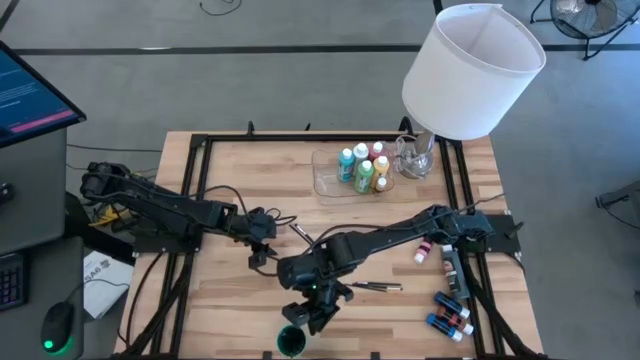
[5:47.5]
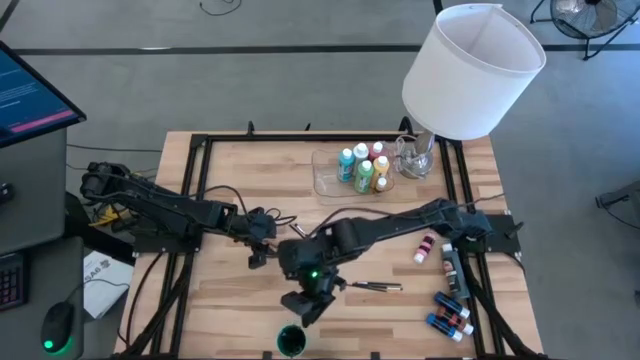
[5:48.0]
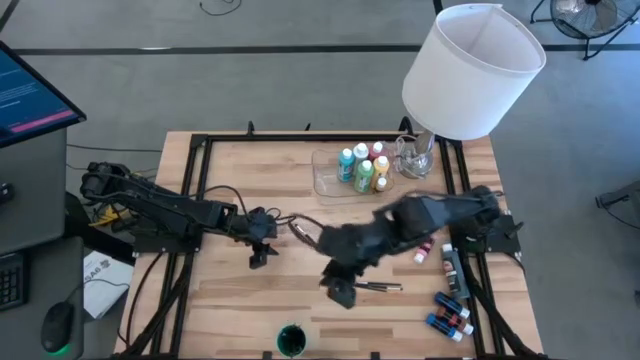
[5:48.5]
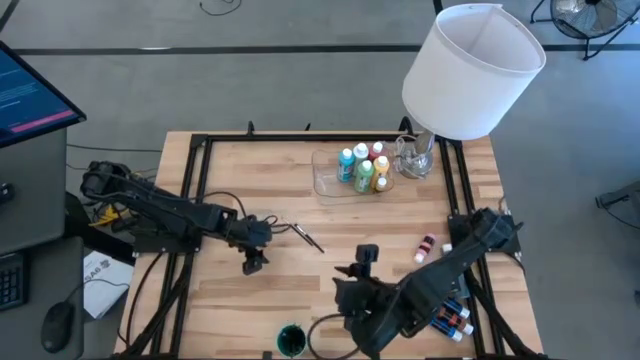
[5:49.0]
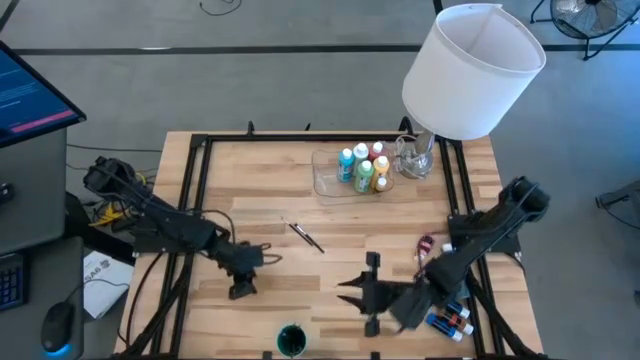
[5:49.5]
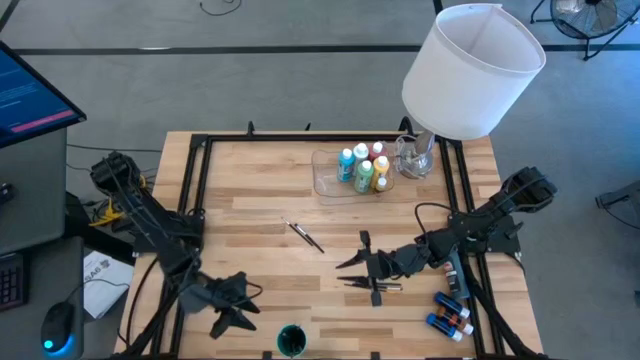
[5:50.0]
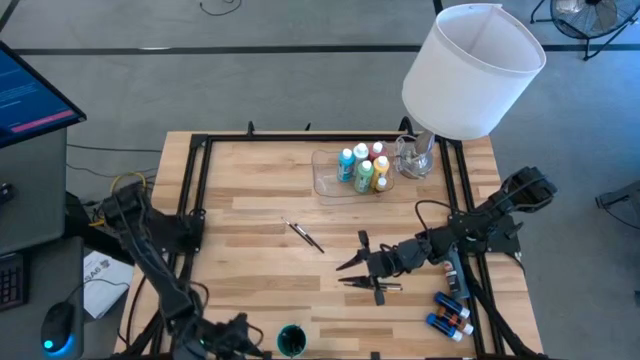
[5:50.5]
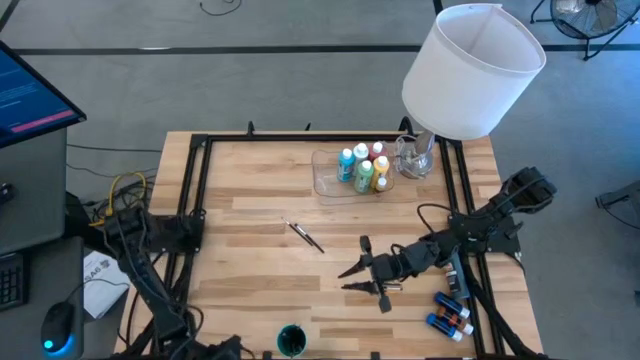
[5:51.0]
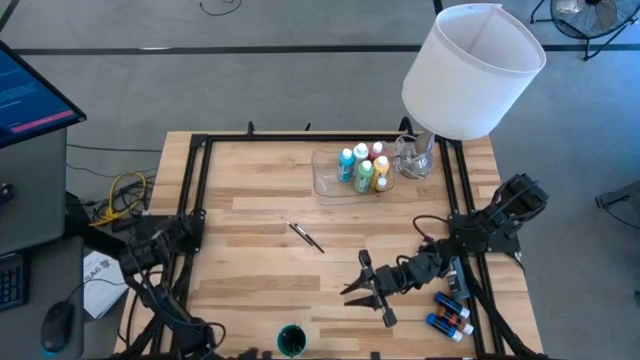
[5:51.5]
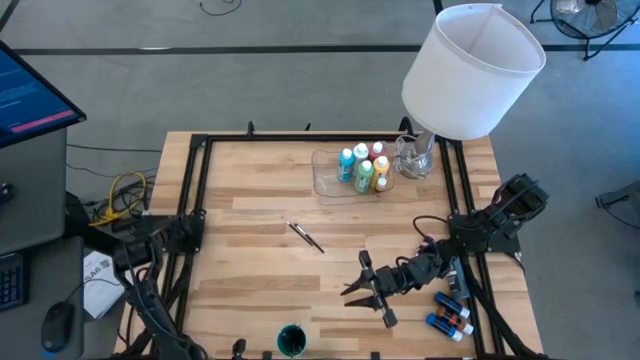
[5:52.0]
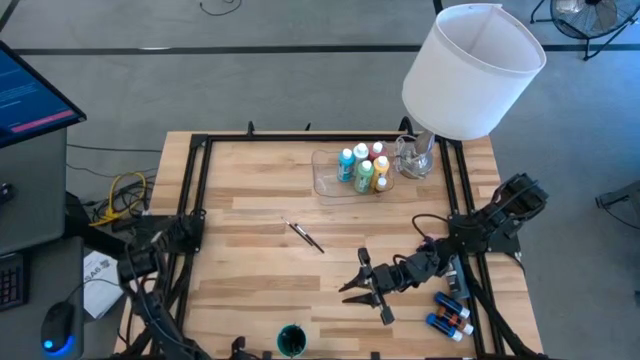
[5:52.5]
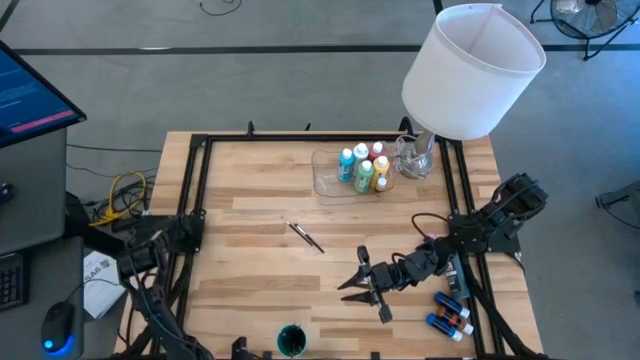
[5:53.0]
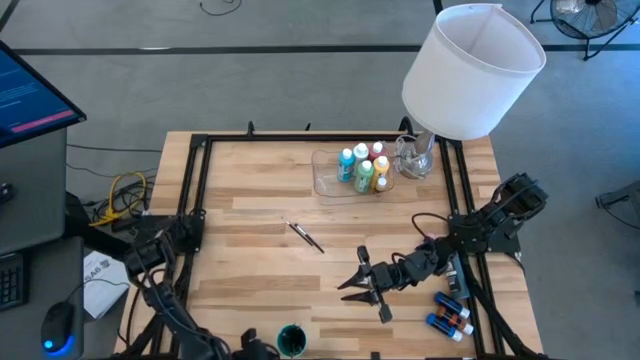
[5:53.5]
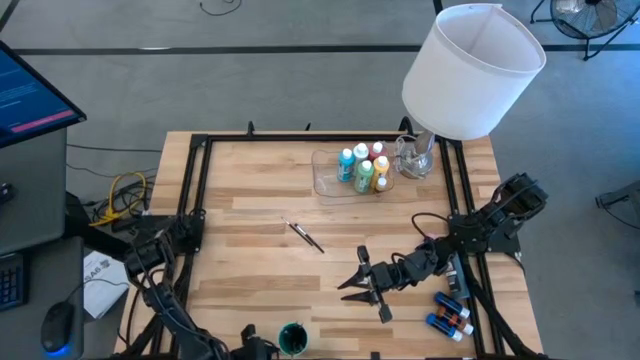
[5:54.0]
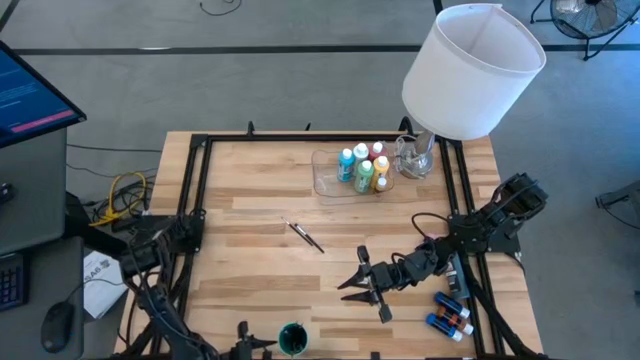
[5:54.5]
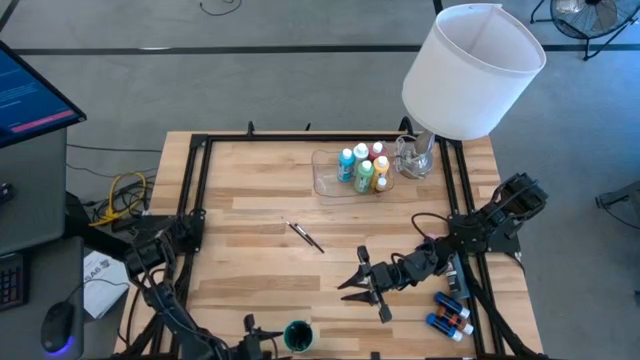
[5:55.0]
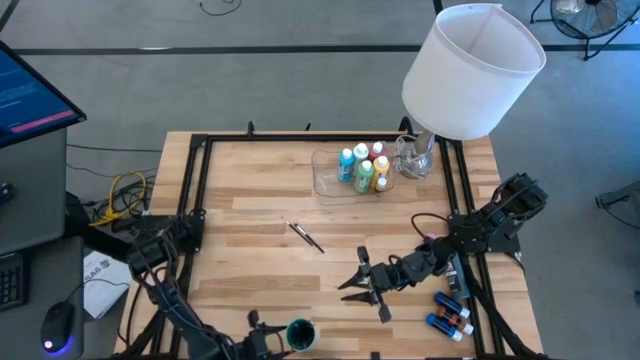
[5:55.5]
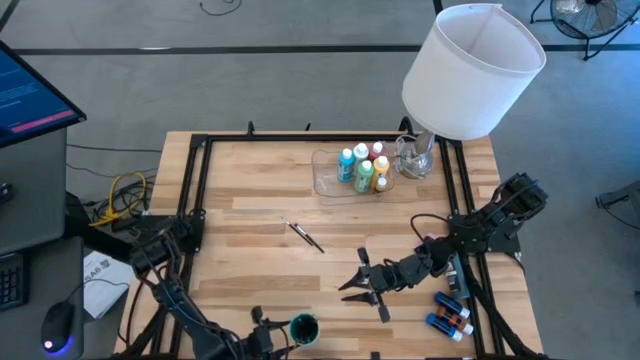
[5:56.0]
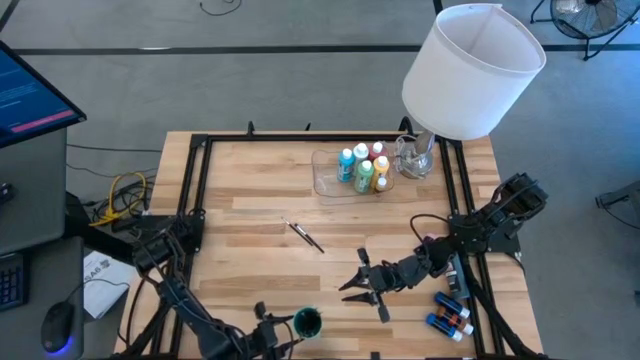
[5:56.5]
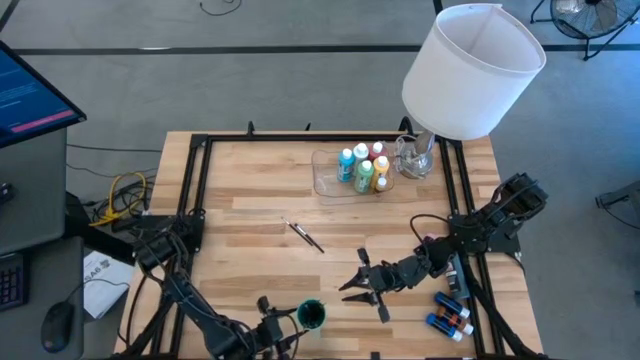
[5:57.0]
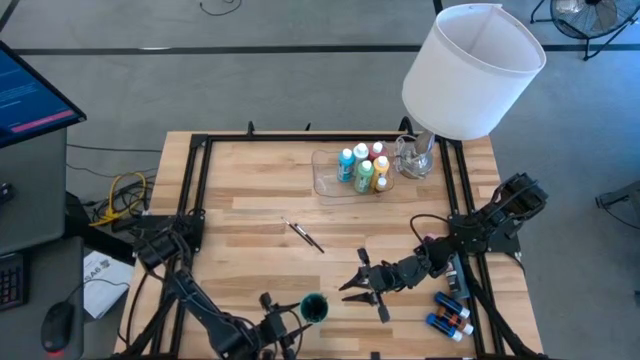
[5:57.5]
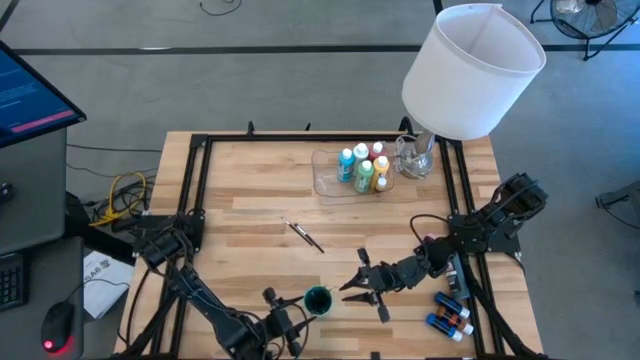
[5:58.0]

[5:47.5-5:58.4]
Task: Pick & Place Paint Supplies
Adjust the green cup on the table
